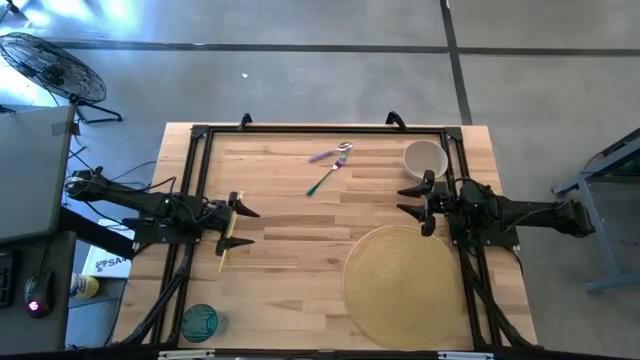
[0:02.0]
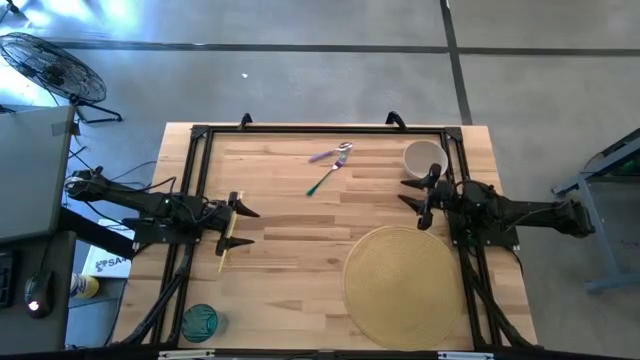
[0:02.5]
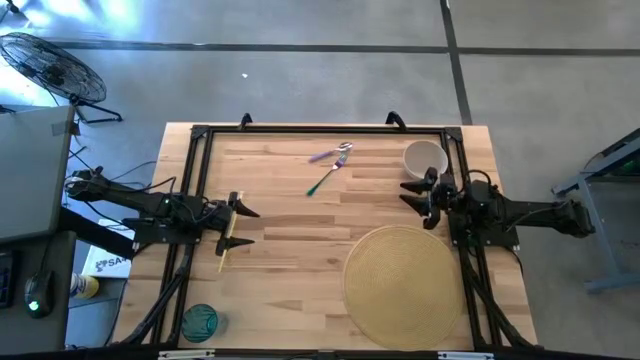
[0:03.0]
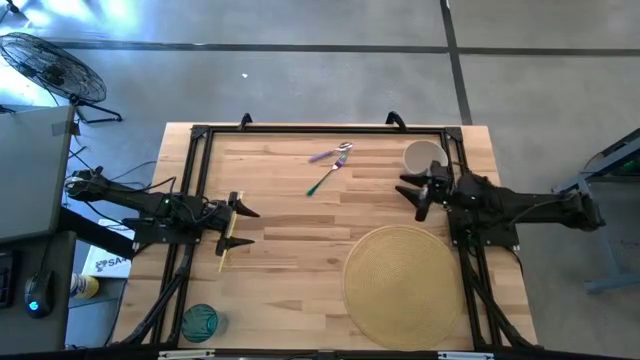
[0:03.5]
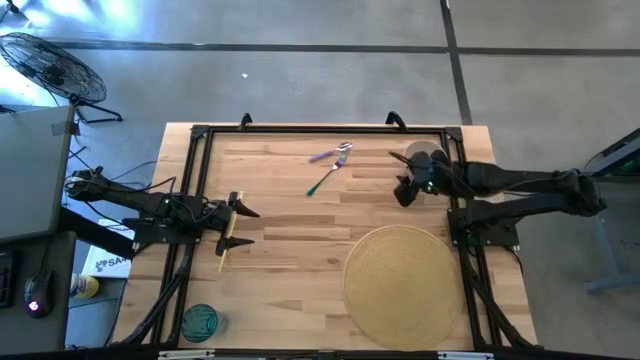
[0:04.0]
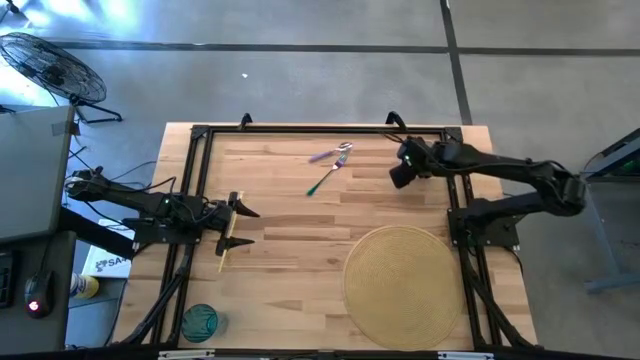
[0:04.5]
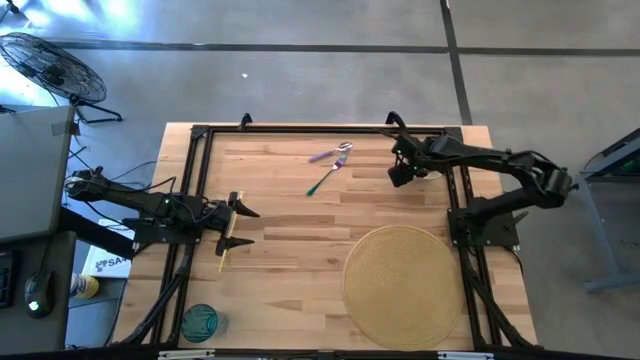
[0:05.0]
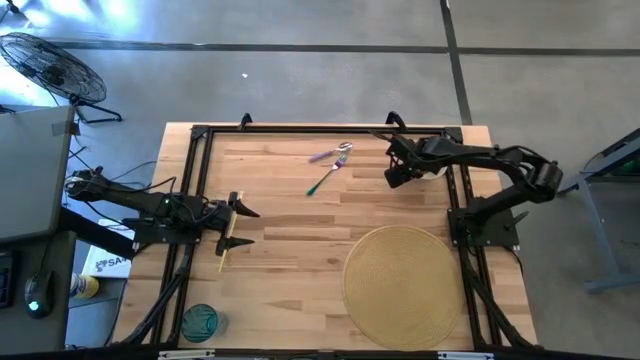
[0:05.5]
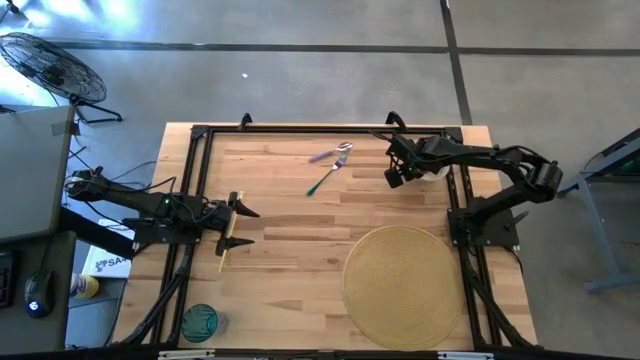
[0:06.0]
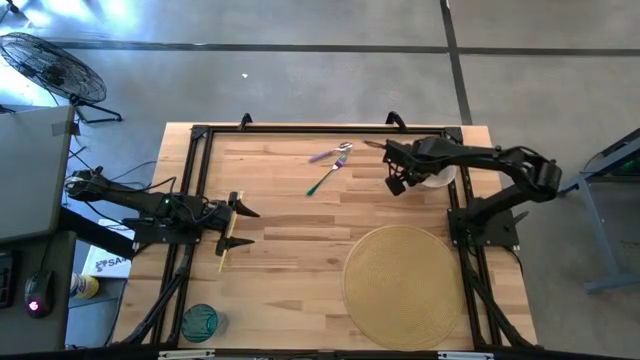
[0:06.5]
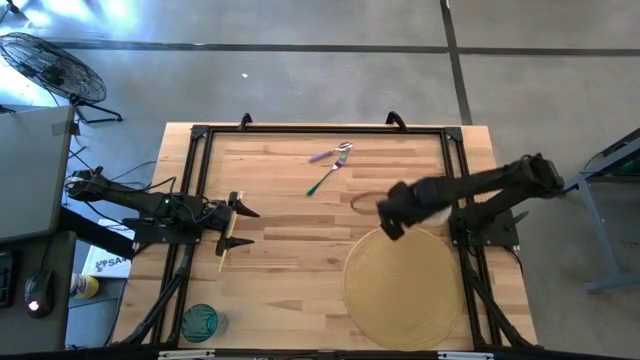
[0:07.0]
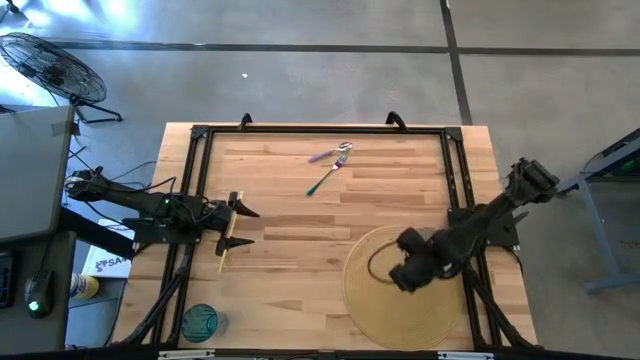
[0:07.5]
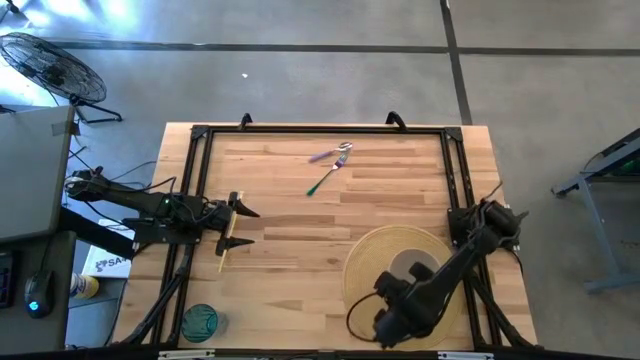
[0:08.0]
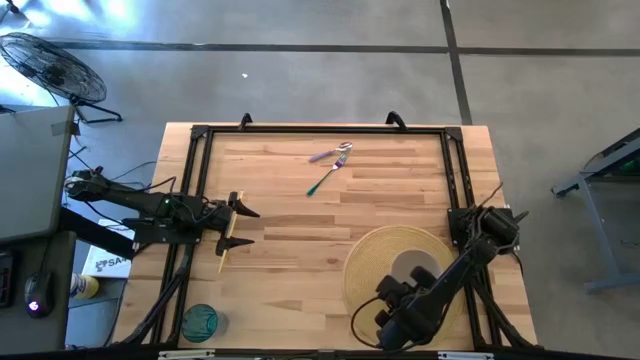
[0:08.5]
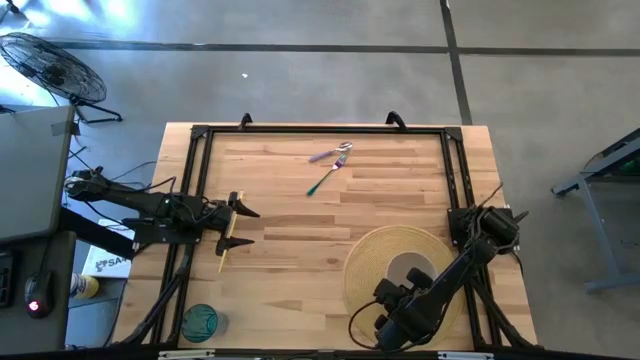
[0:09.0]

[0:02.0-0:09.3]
Task: Pick & Place Utensil
Put the white bowl on the table placemat

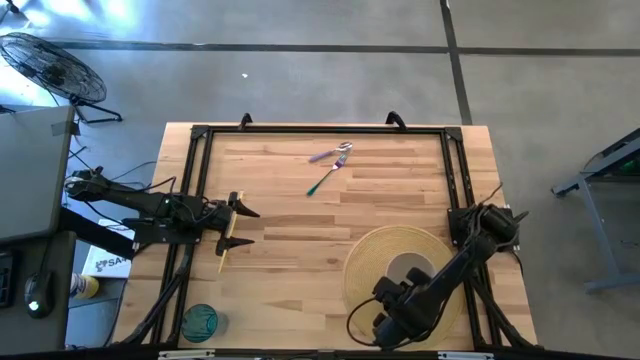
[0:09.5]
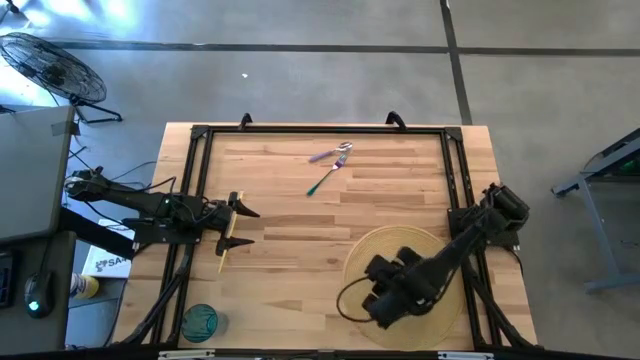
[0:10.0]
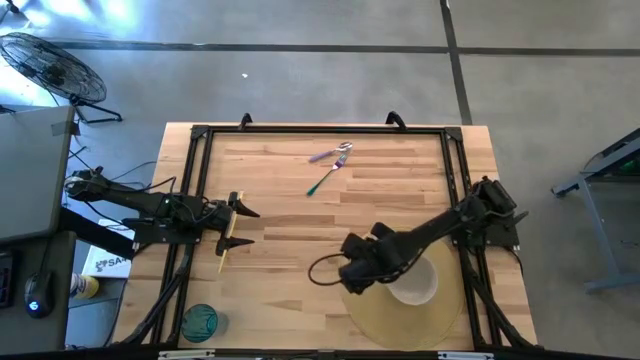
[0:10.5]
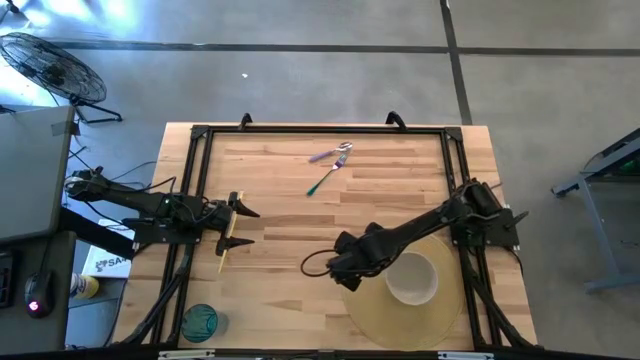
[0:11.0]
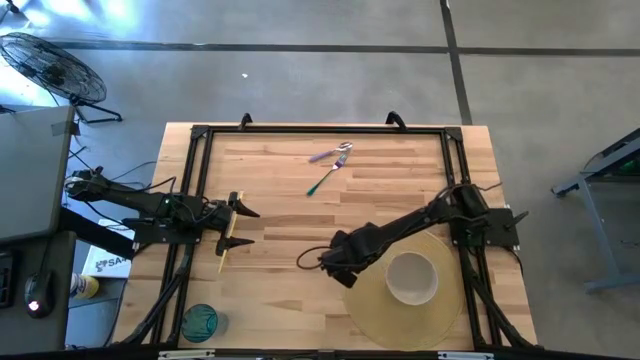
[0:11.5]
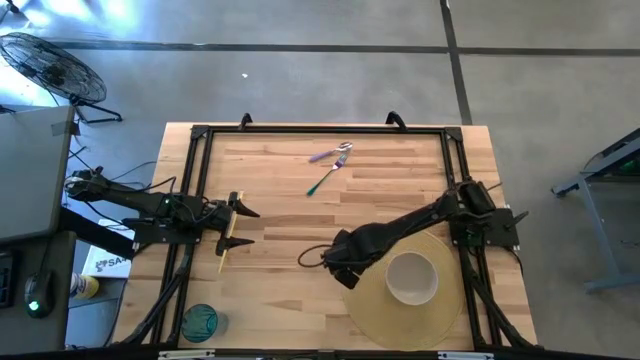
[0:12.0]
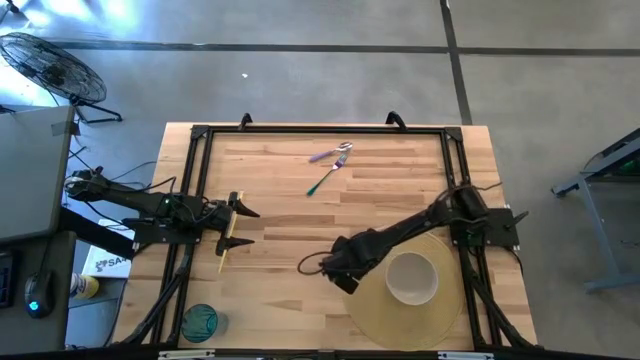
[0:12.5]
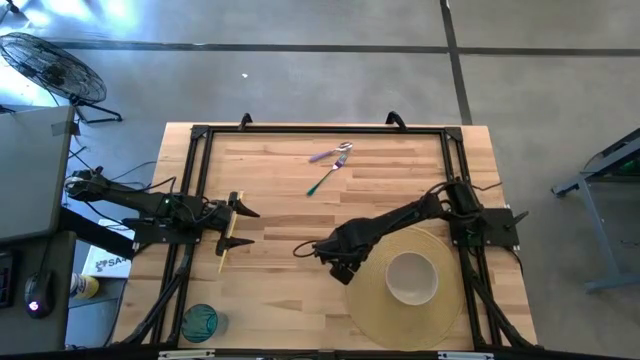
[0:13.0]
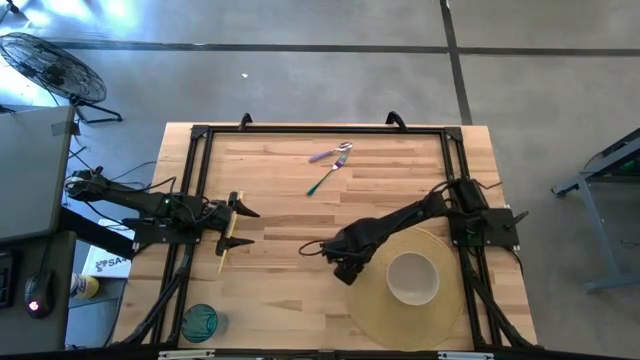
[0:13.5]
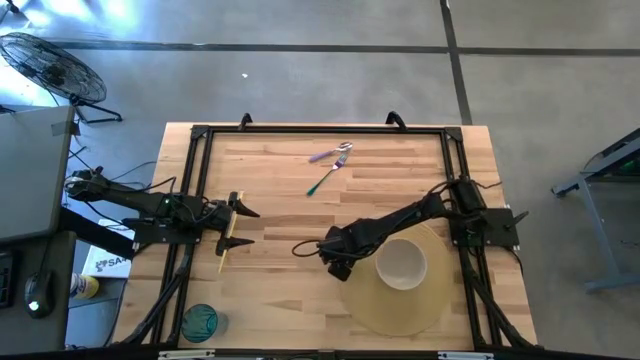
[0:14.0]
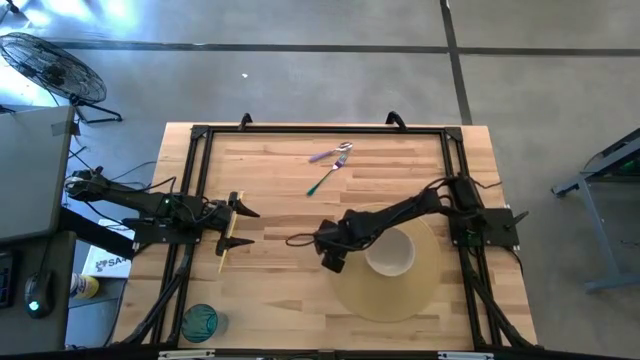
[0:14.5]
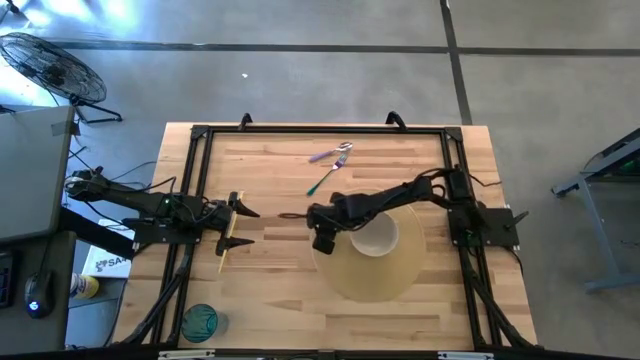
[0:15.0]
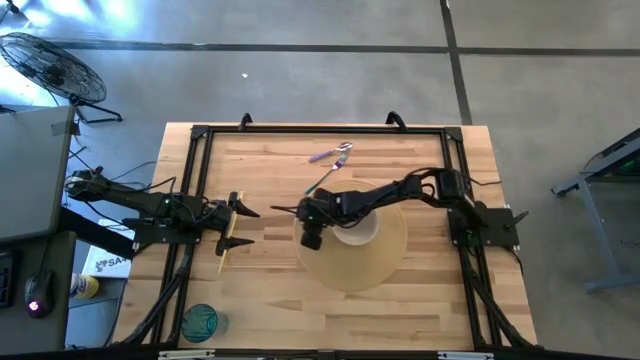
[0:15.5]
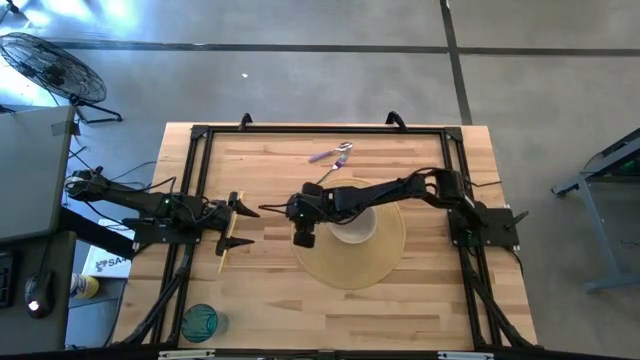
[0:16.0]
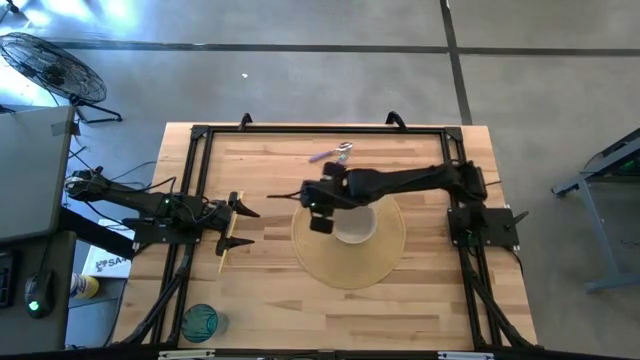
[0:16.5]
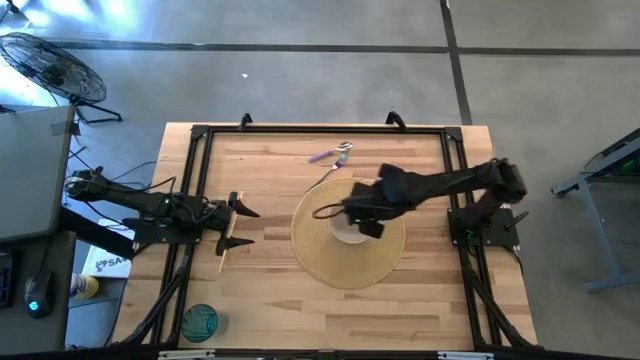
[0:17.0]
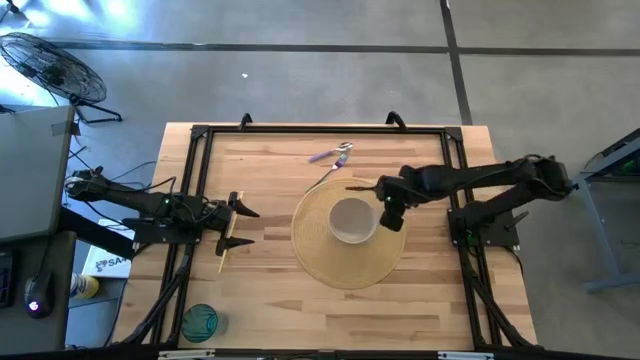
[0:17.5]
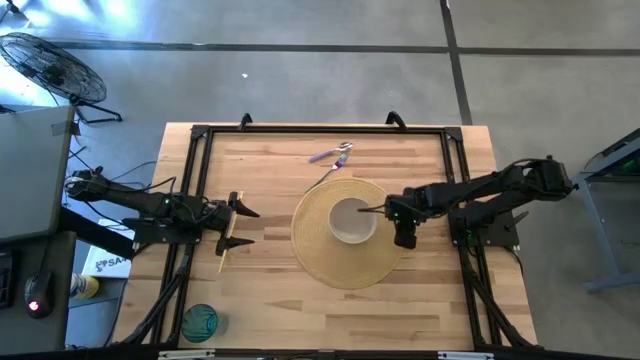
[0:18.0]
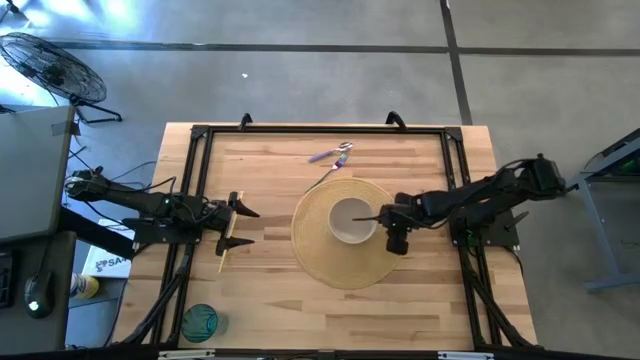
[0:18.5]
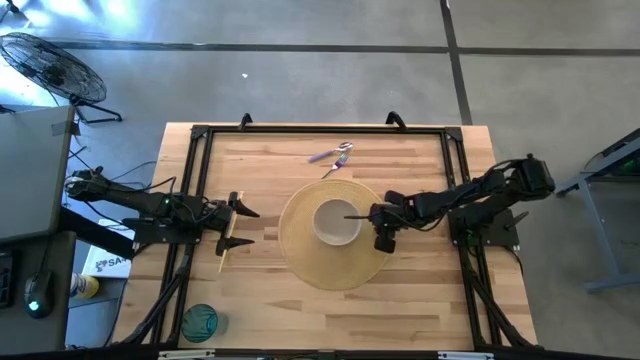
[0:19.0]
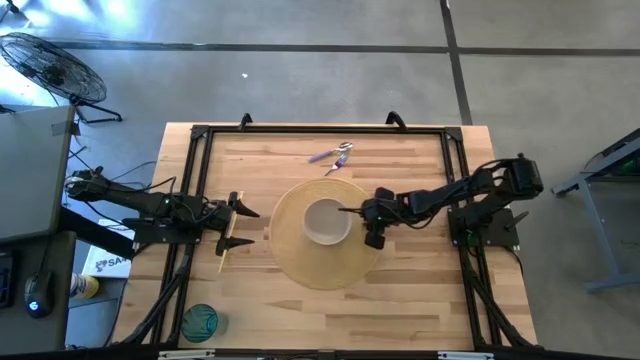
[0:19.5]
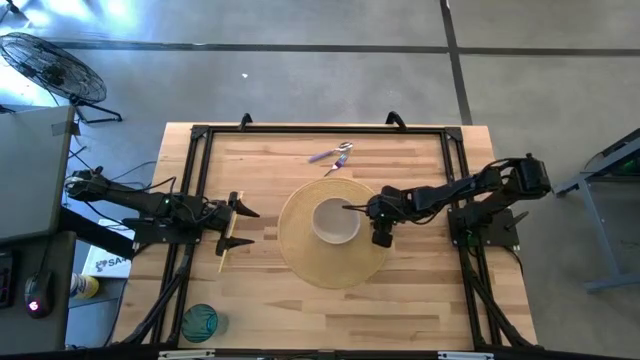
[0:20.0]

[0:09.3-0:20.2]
Move the table placemat to the center

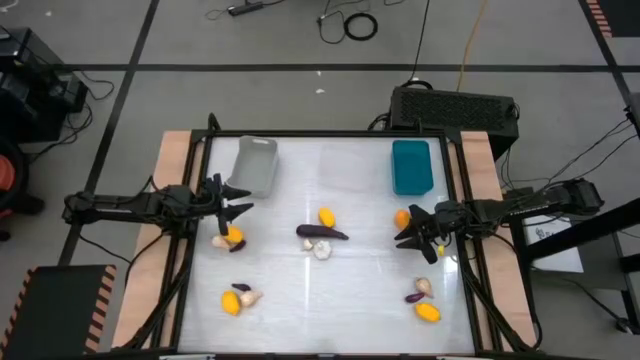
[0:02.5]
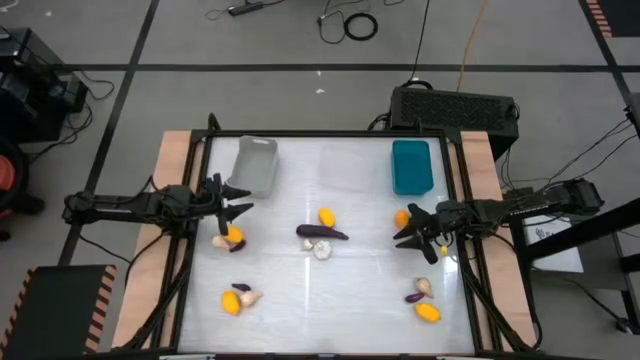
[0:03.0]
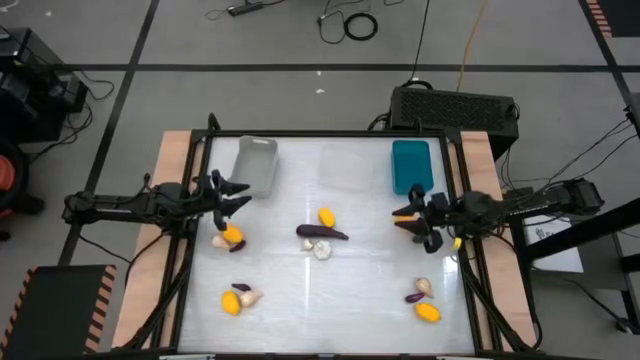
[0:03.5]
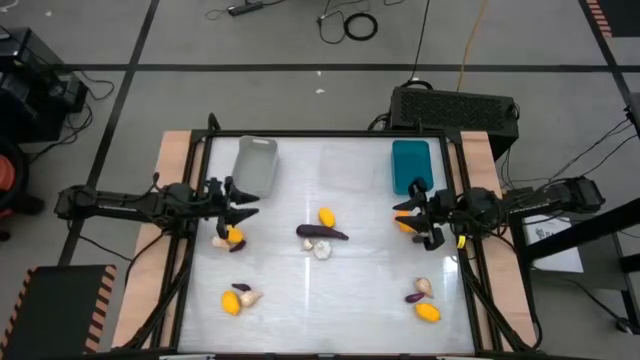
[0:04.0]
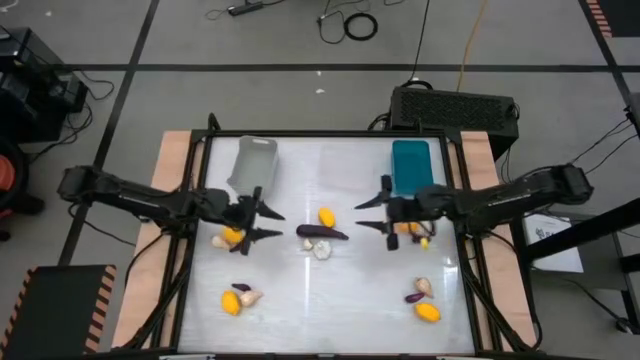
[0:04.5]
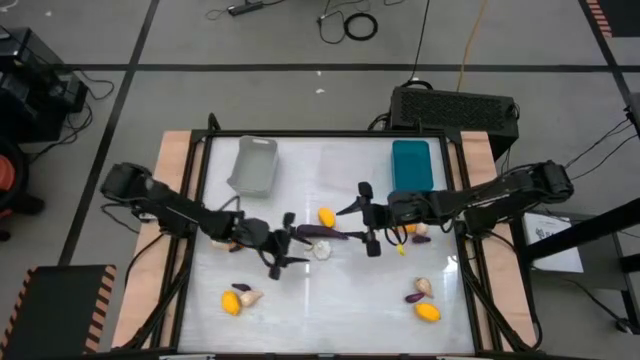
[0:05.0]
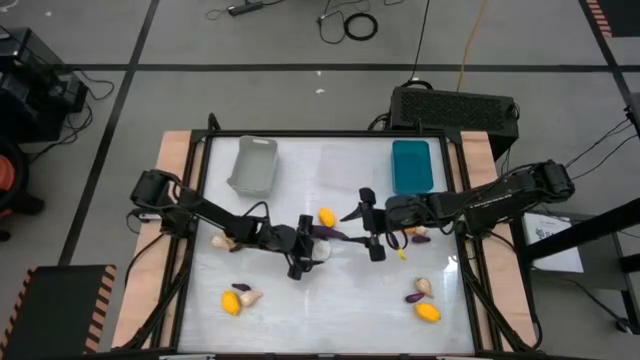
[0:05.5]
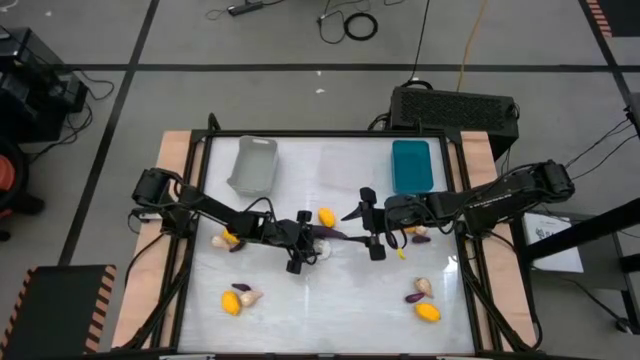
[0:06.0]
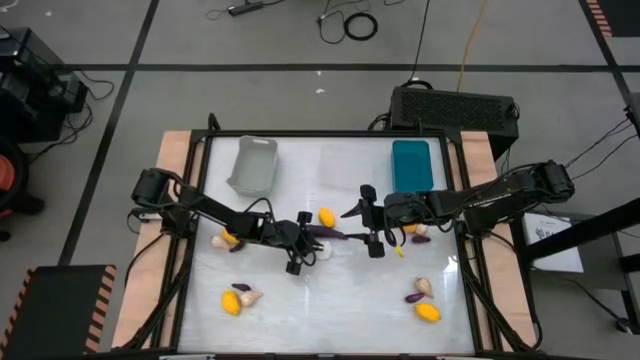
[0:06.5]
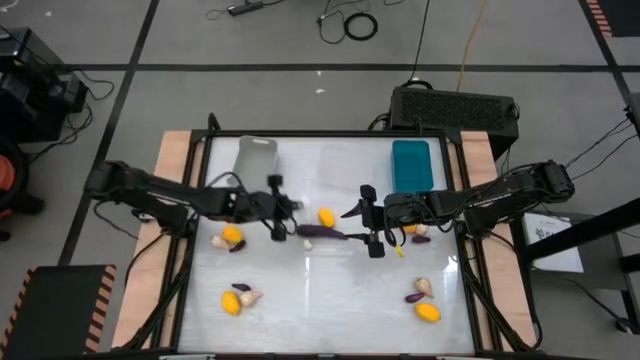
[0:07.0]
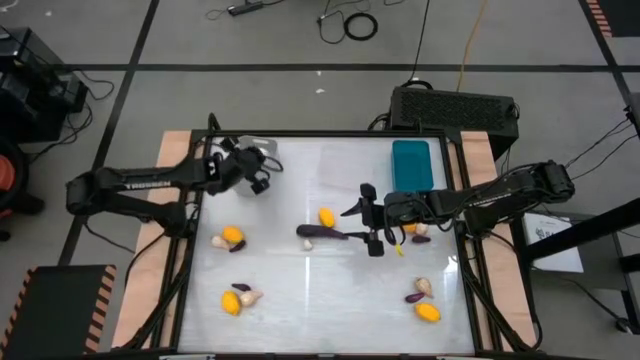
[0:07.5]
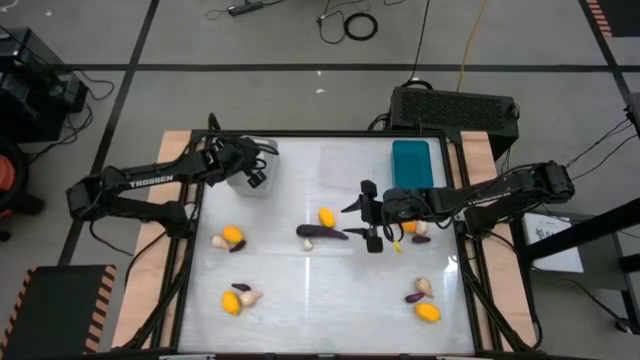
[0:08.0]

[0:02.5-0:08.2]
Task: Sort produce into baskets
Put the garlic into the gray bin
